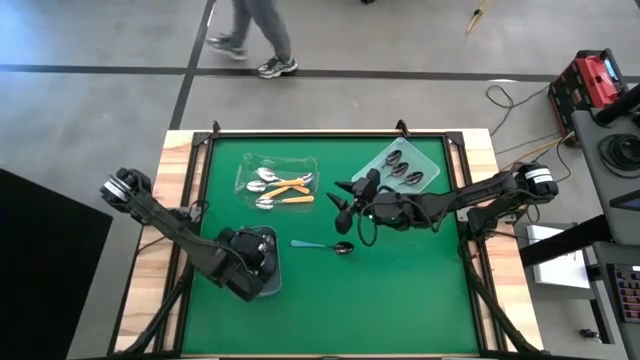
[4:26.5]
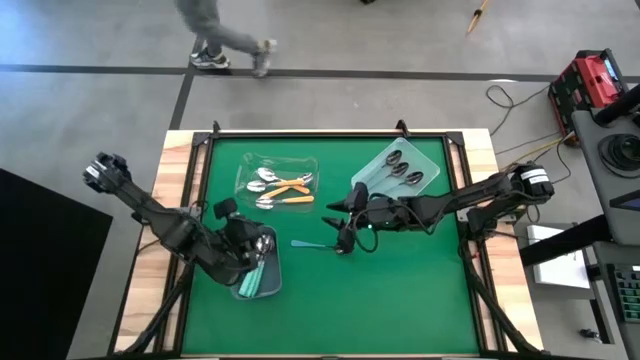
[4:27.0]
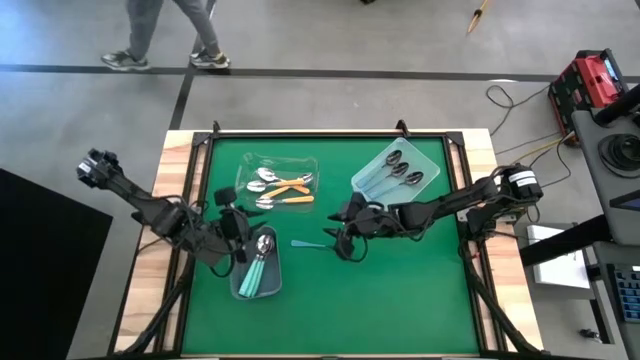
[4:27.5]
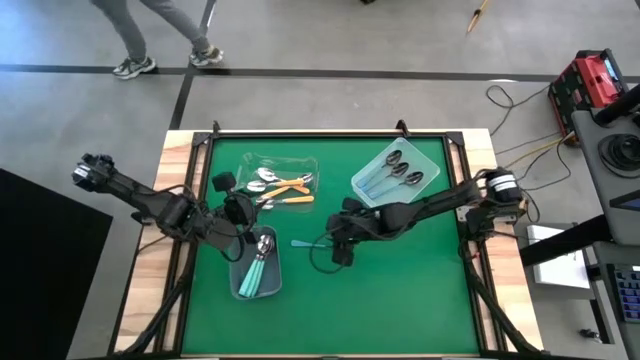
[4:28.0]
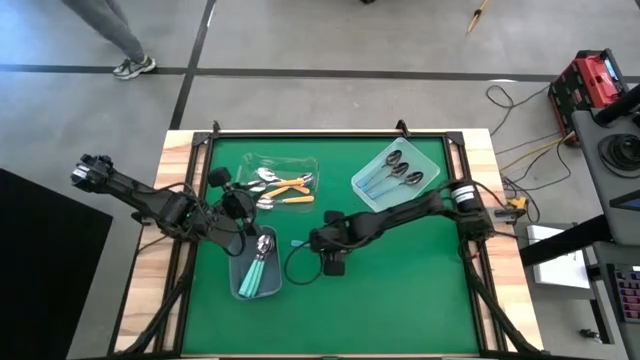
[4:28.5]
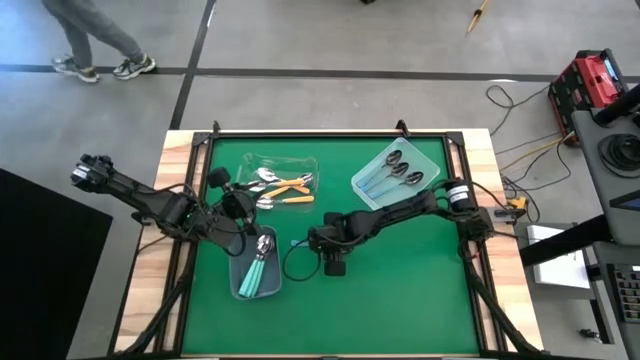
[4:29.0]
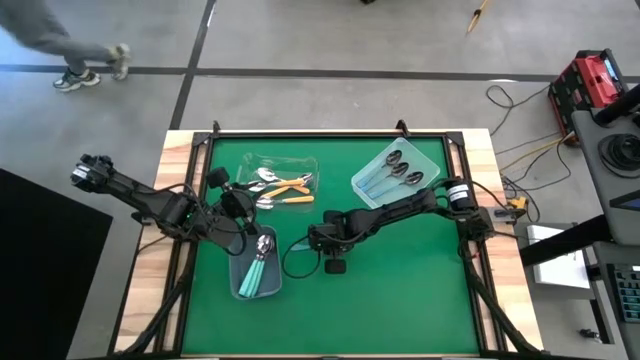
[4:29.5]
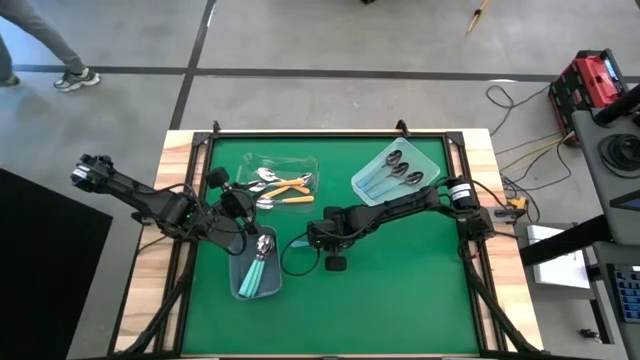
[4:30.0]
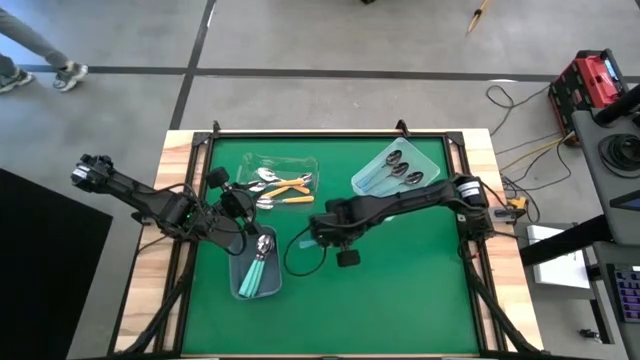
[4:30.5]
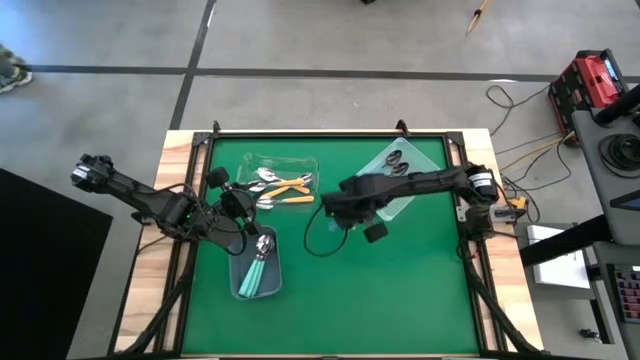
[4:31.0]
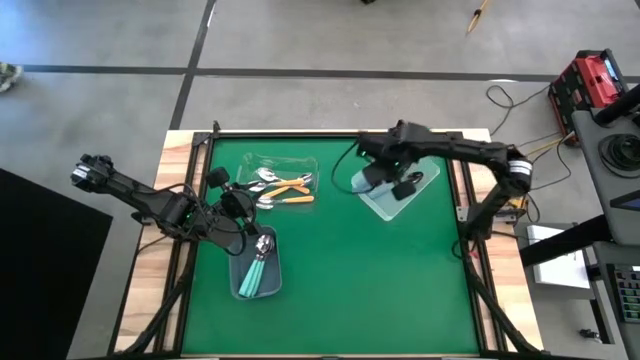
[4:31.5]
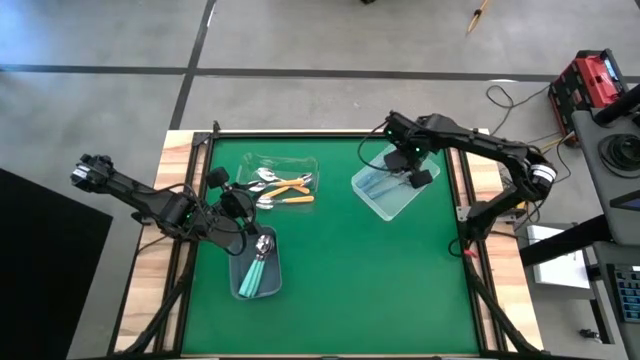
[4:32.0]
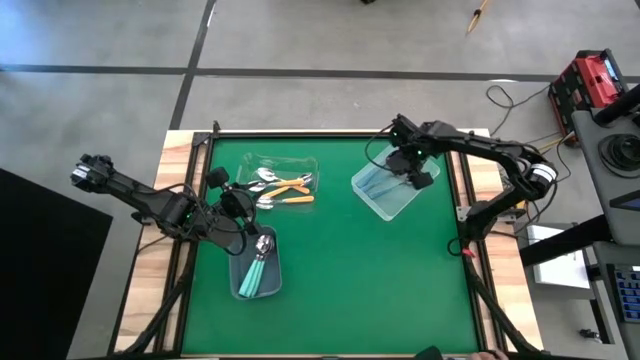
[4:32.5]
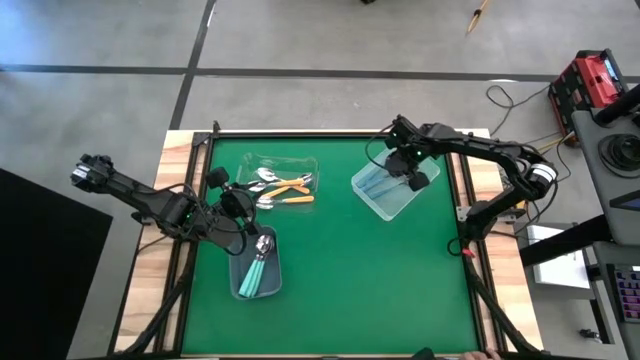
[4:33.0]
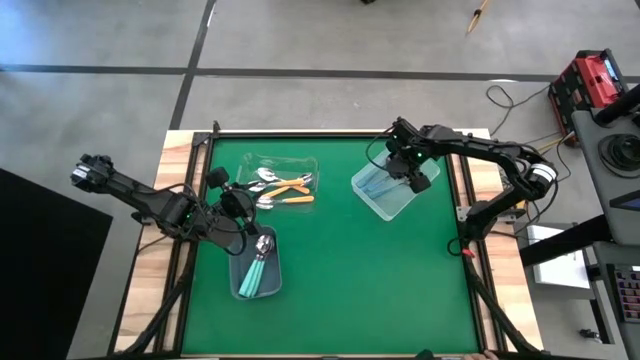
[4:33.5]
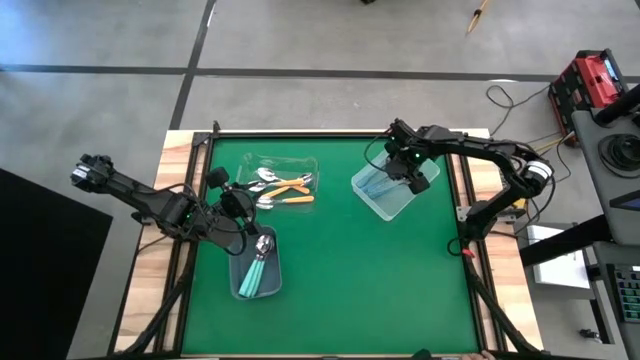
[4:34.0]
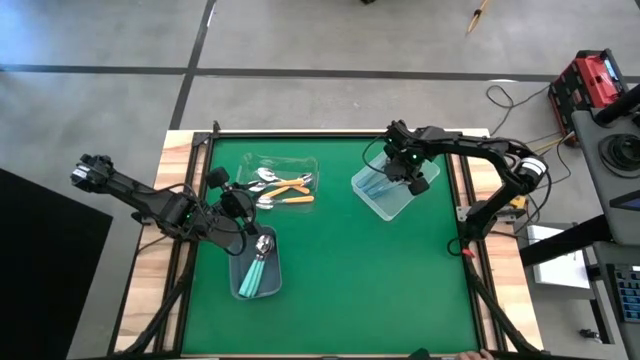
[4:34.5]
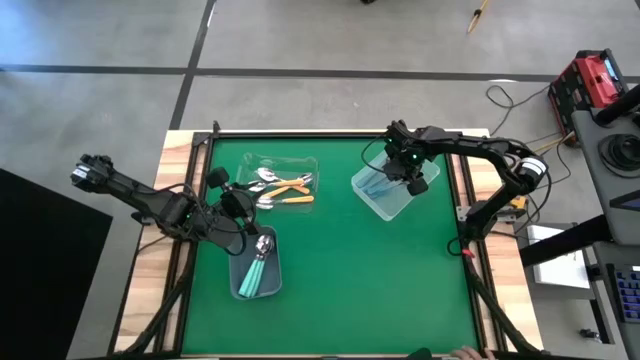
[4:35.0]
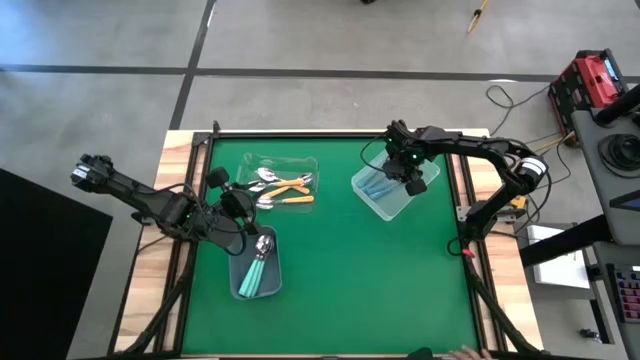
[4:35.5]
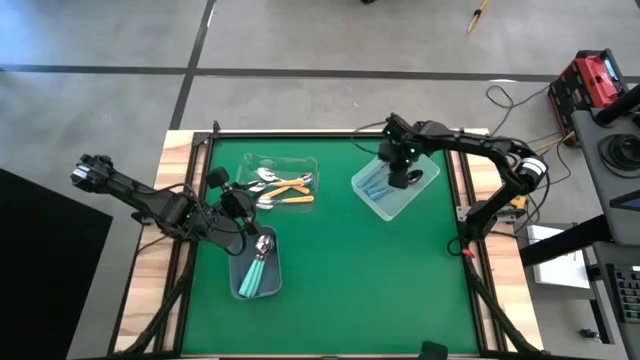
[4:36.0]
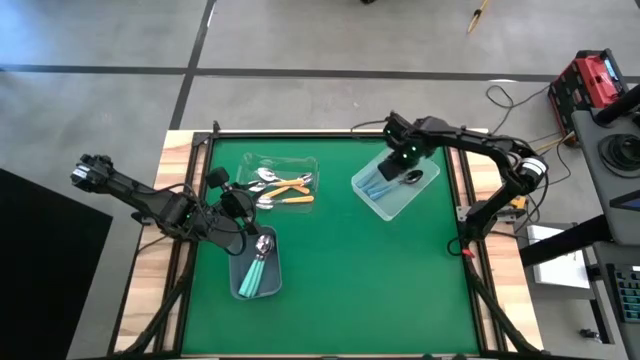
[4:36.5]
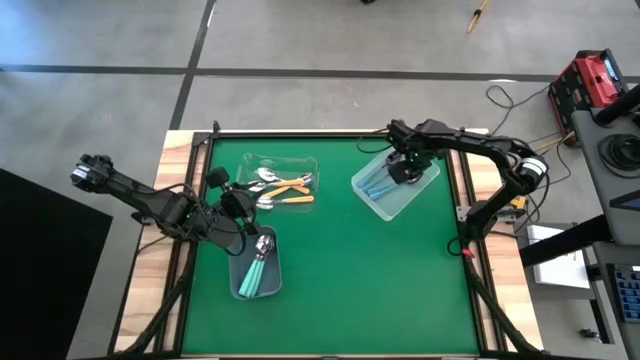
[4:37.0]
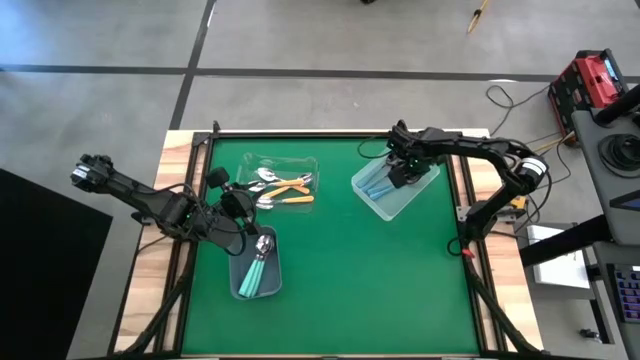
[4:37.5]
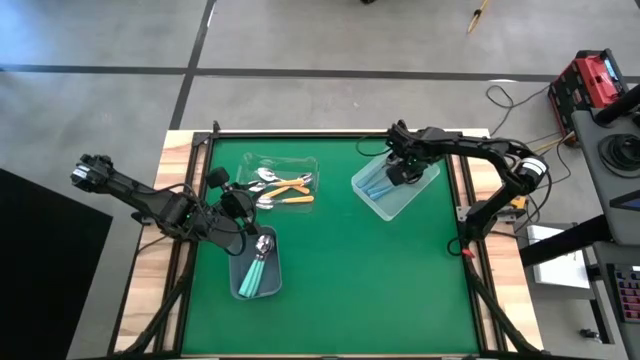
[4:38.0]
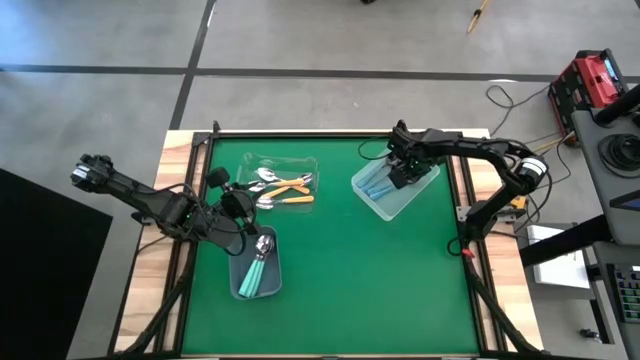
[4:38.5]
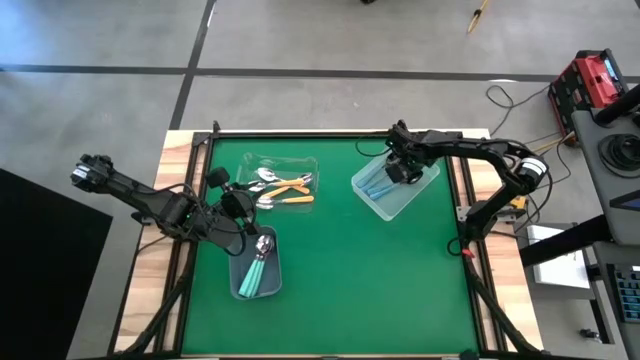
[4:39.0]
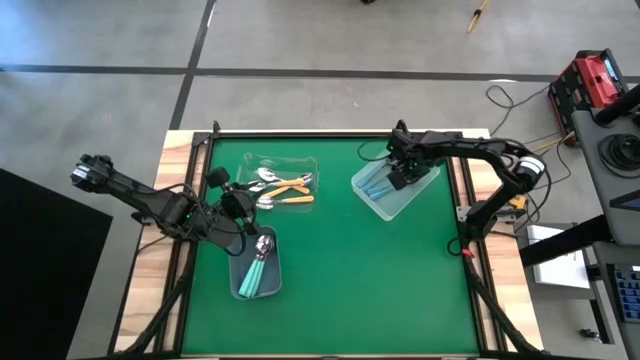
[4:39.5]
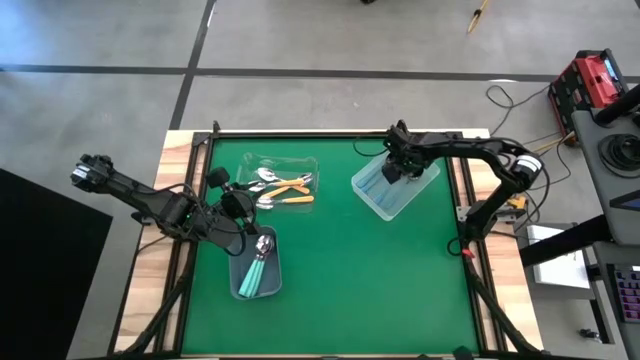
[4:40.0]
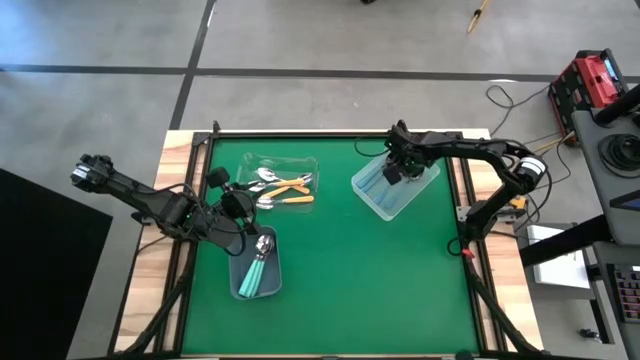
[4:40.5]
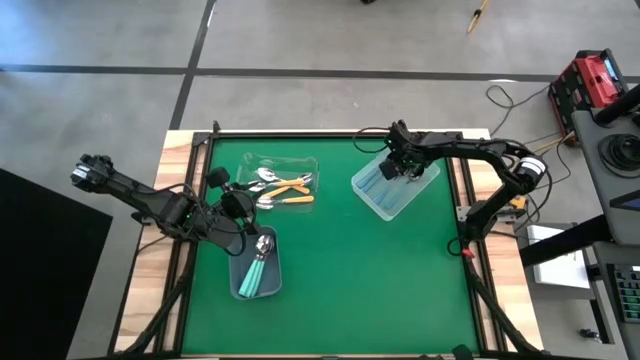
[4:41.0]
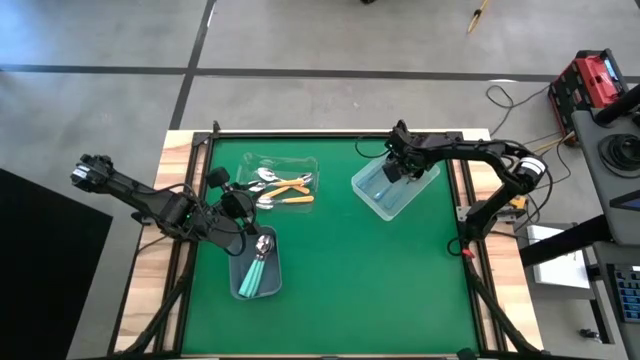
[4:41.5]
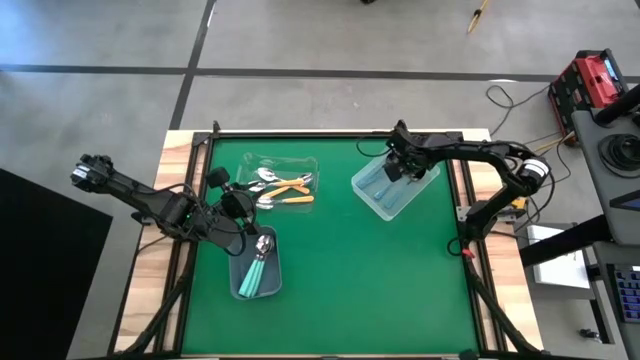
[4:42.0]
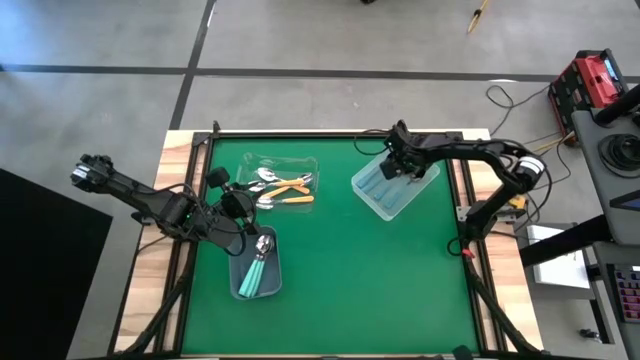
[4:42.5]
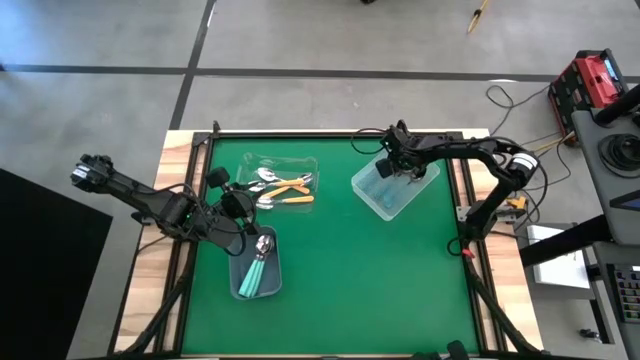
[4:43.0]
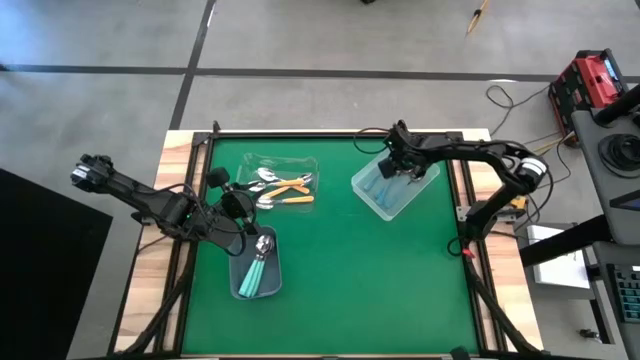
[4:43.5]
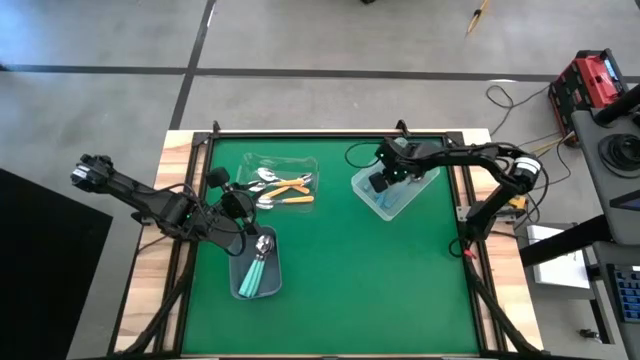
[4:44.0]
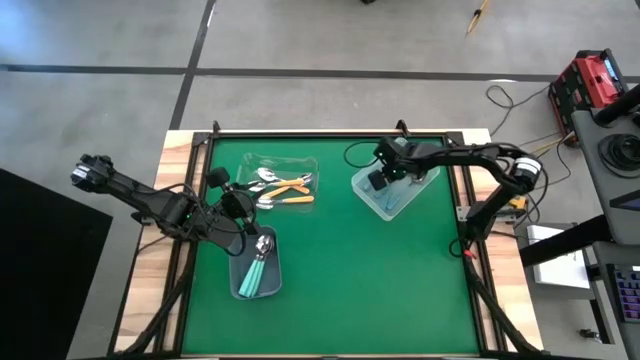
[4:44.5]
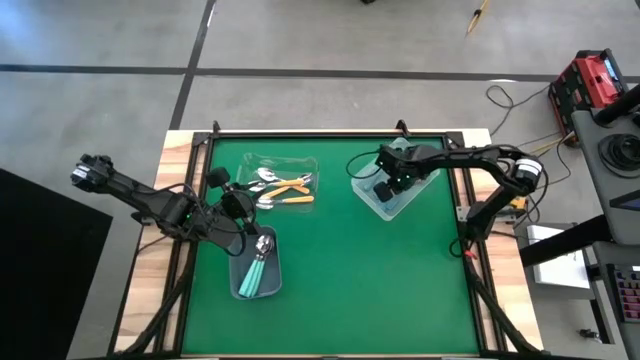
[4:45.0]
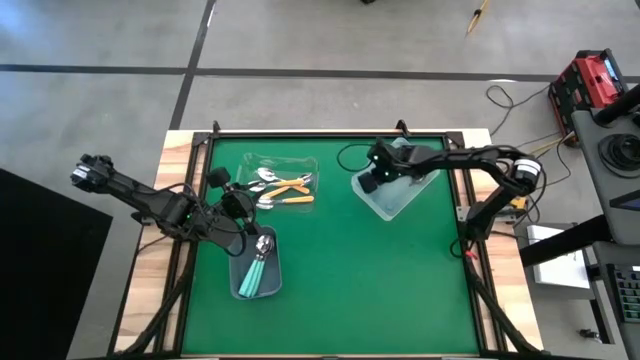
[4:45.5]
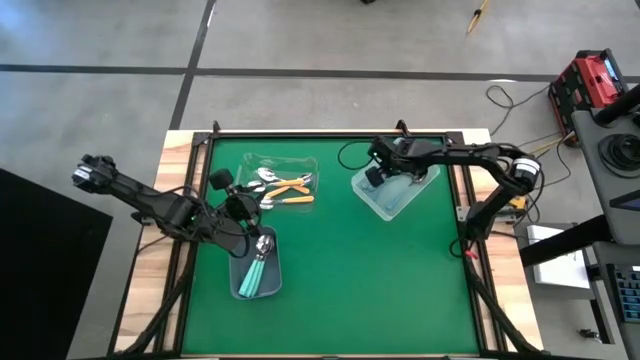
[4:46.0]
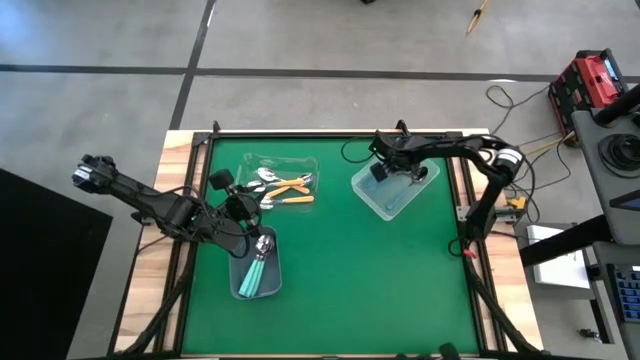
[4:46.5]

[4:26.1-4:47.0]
Task: Sort silverware by color (type)
Put the blue spoon into the white bin
